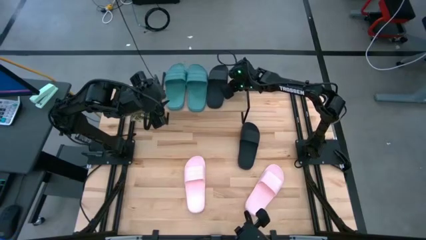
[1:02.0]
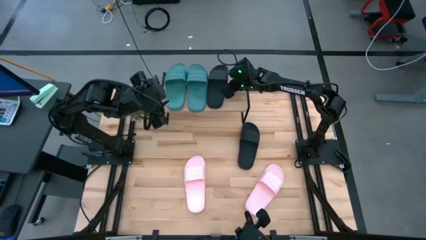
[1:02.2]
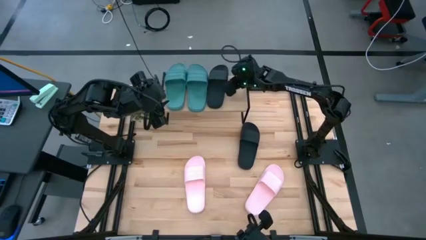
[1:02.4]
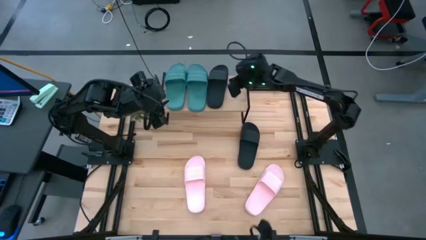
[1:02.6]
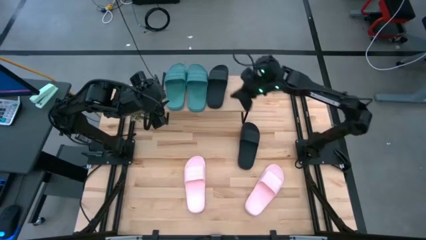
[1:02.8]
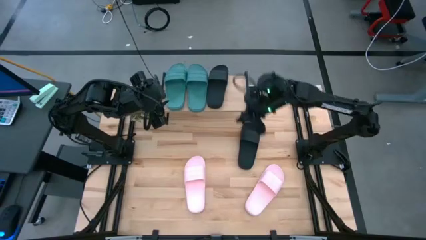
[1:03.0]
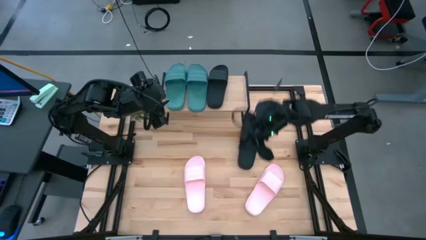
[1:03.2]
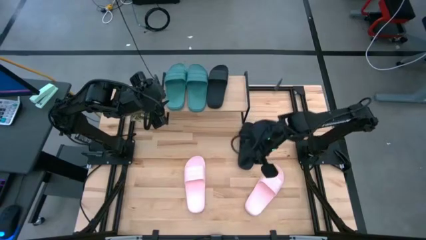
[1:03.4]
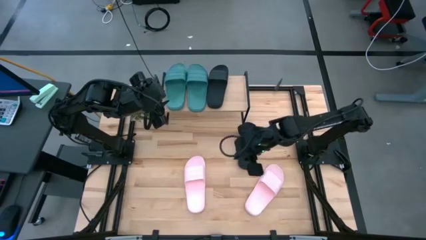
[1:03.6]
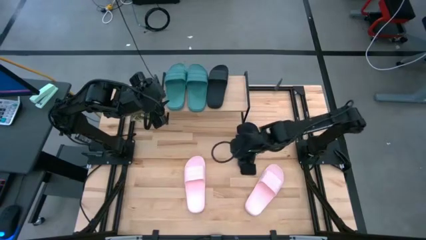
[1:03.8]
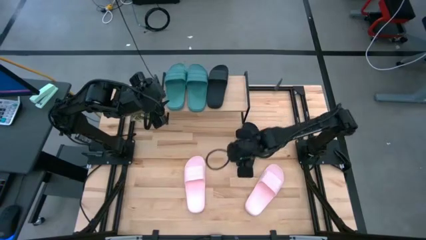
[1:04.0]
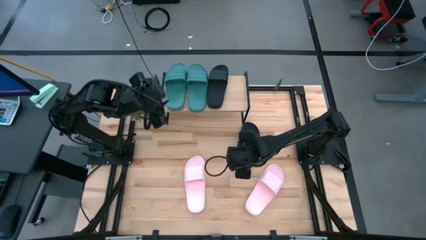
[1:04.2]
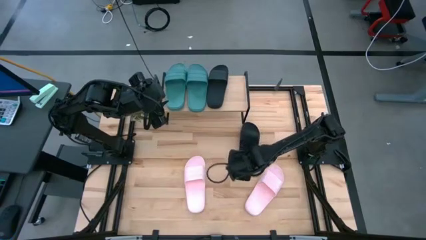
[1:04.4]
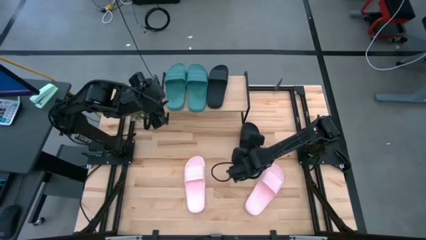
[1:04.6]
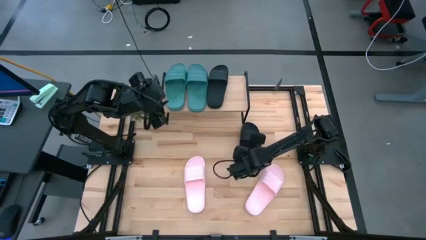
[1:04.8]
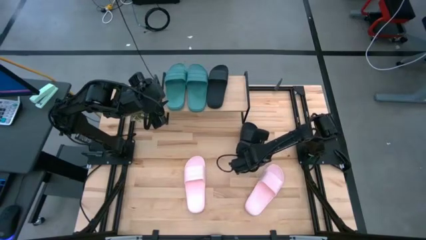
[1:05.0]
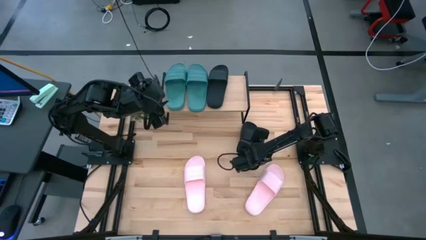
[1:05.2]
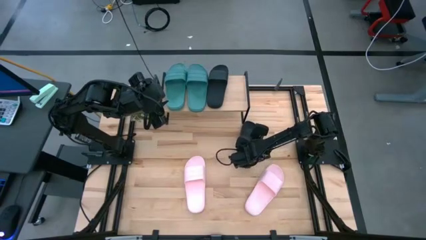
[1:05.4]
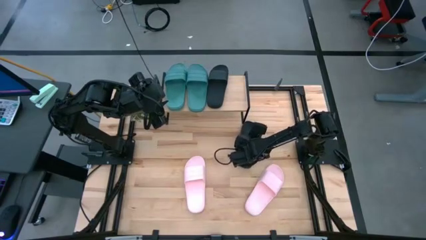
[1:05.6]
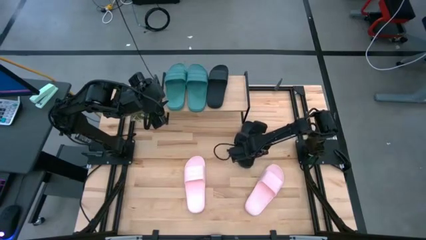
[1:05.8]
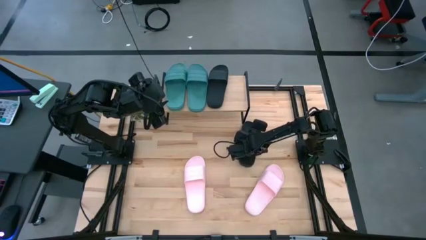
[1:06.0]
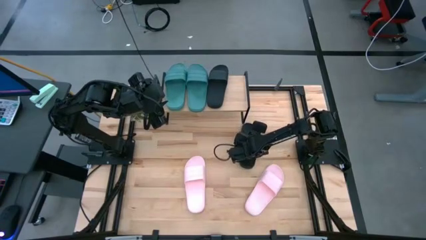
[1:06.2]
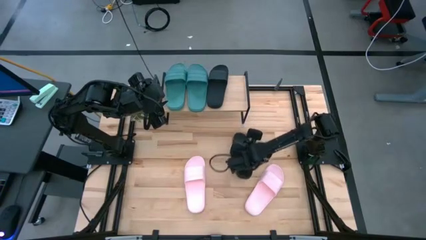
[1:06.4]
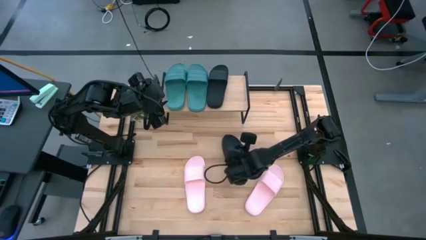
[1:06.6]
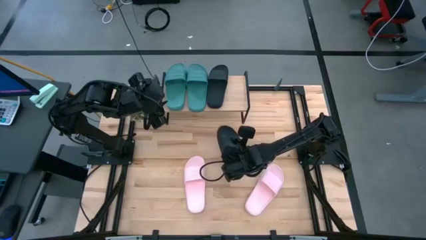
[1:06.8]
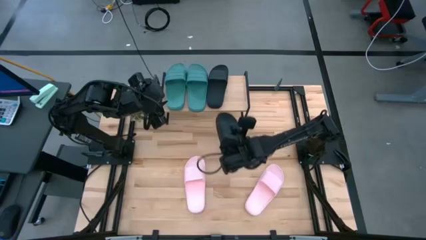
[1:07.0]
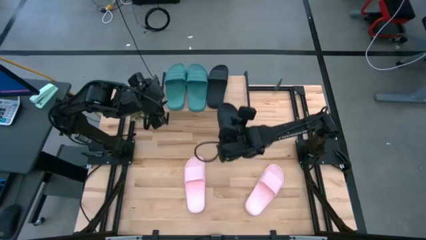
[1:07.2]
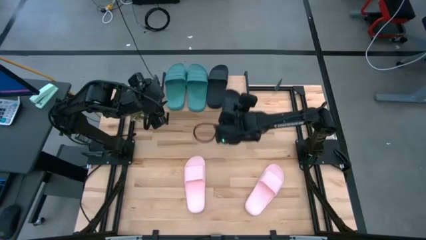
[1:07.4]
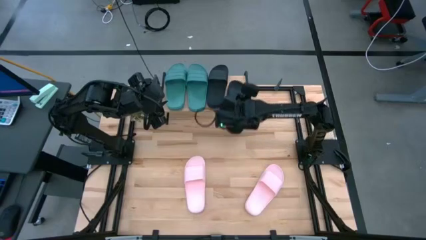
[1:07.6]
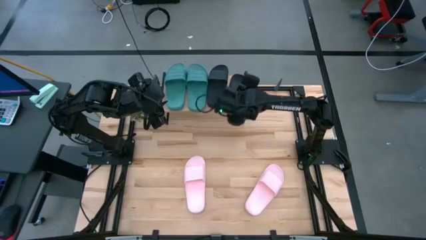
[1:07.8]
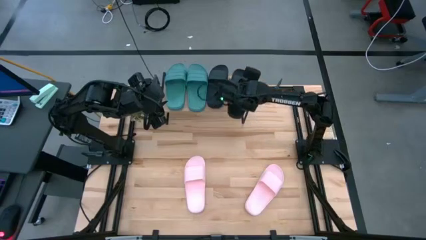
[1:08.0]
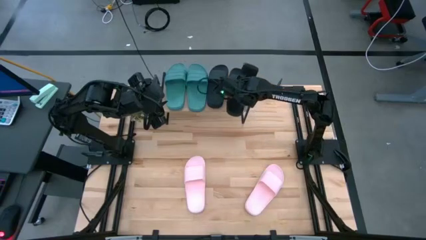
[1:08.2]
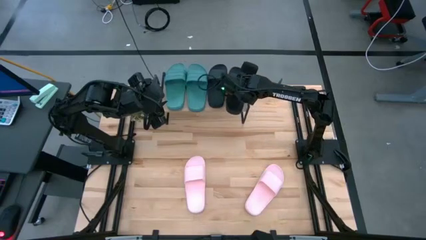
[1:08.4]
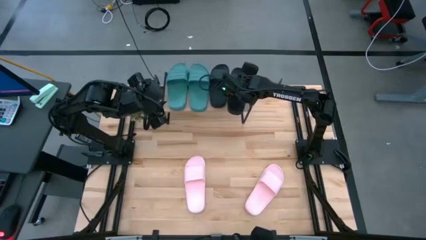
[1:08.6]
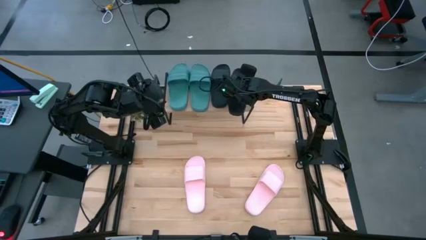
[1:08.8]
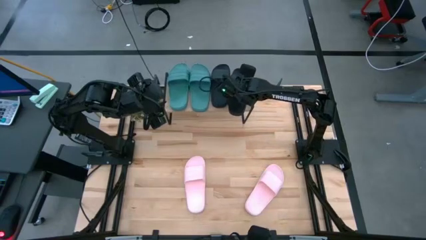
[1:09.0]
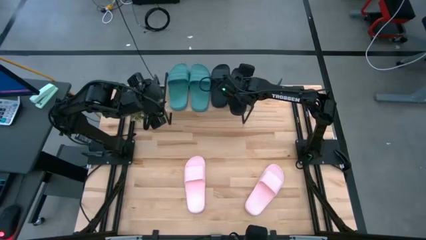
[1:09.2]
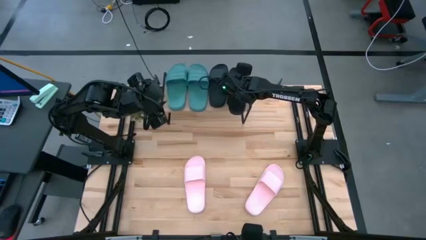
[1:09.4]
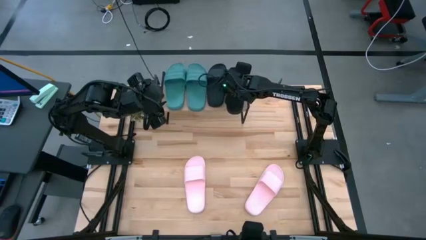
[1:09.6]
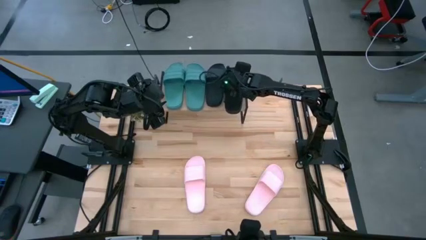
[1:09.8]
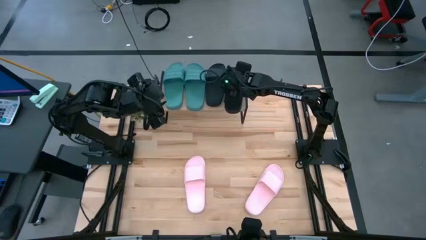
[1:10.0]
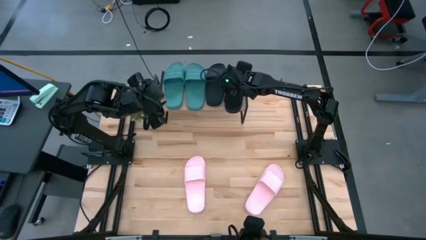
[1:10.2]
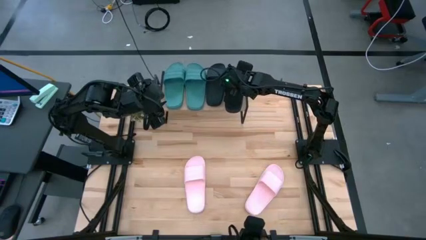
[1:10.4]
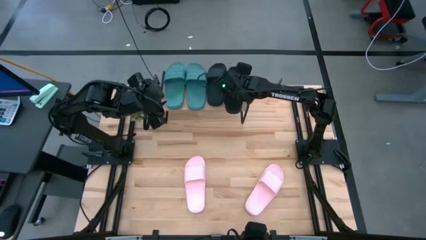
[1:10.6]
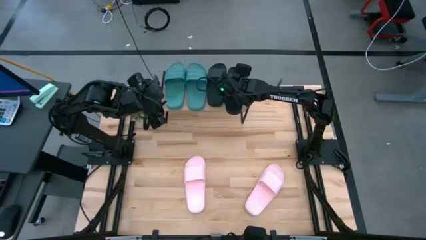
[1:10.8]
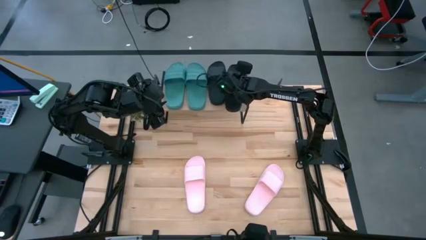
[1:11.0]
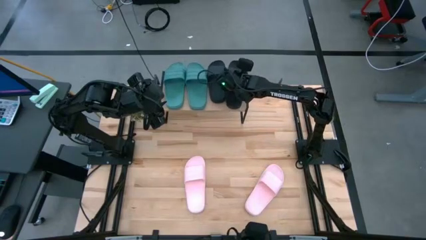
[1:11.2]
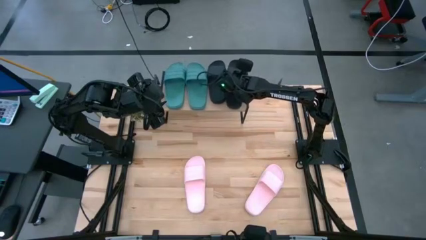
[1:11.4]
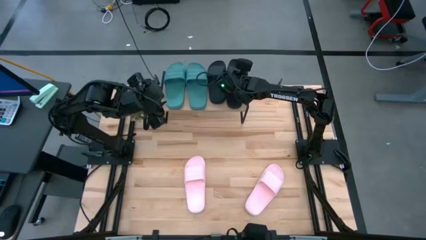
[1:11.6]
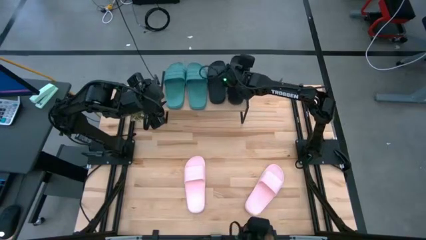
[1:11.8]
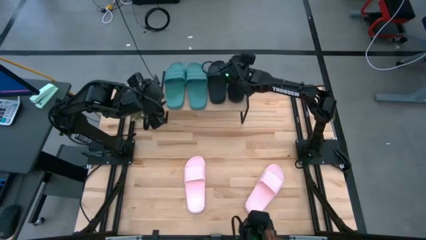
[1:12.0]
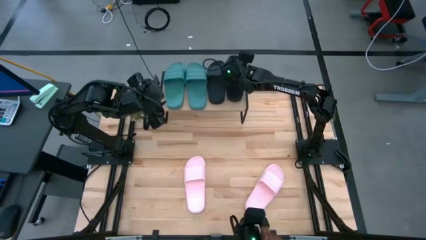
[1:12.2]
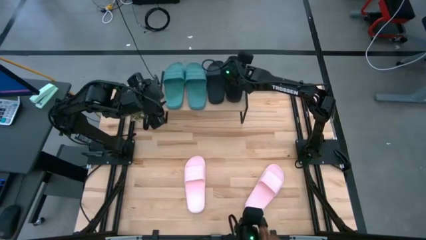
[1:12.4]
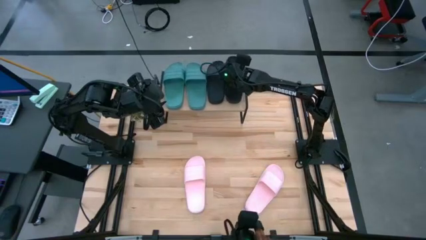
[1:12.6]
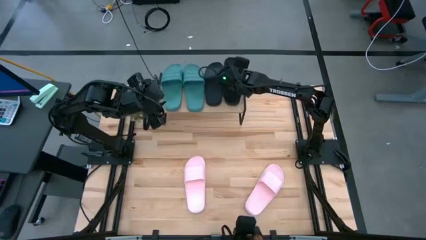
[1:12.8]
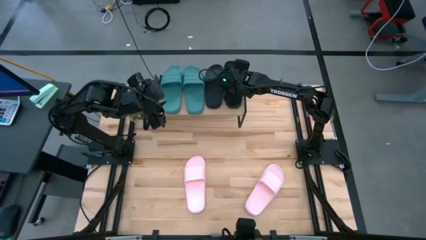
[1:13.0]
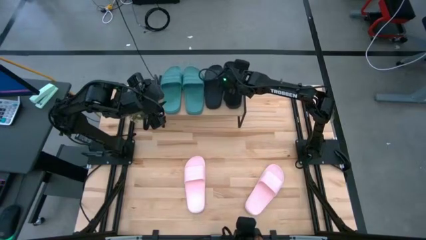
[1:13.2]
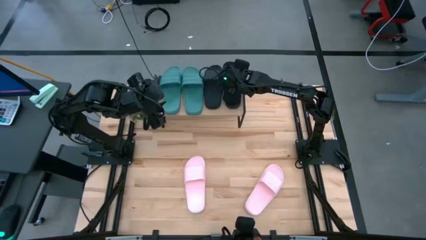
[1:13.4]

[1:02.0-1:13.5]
Task: Pick and place slides into the shelf
Put the black slide on the shelf

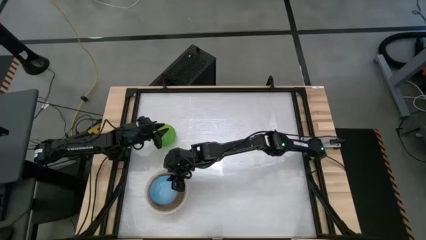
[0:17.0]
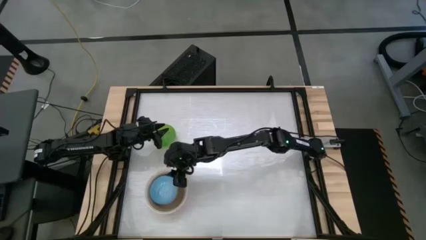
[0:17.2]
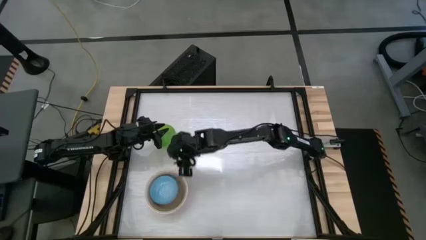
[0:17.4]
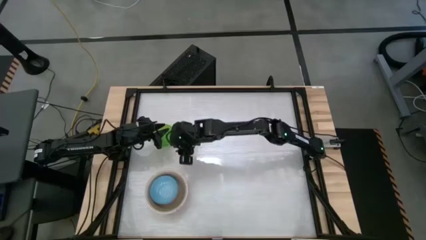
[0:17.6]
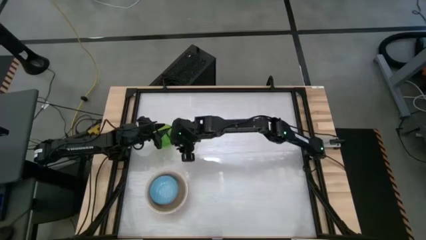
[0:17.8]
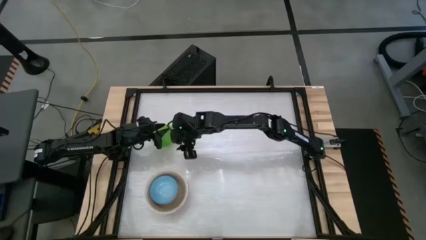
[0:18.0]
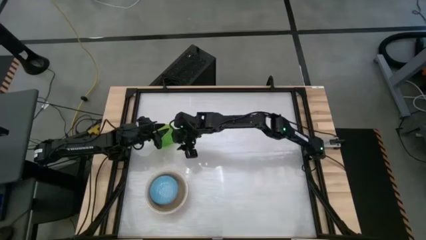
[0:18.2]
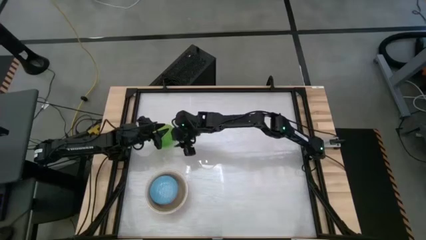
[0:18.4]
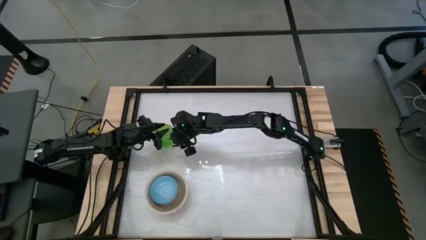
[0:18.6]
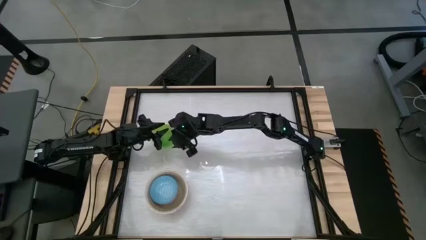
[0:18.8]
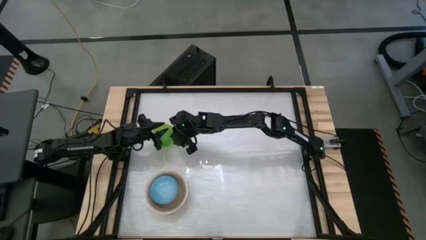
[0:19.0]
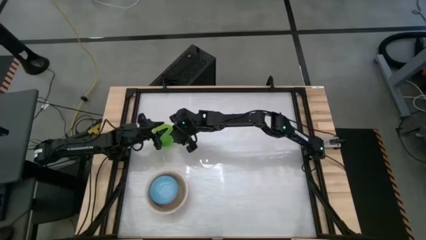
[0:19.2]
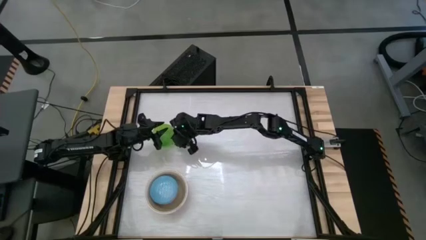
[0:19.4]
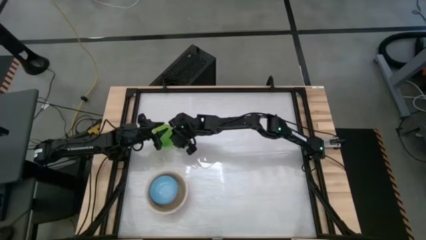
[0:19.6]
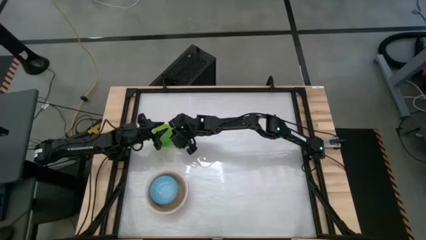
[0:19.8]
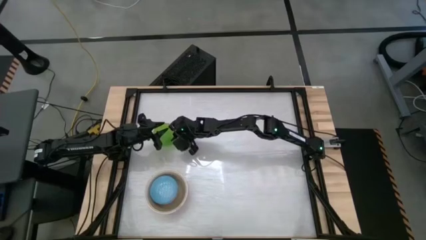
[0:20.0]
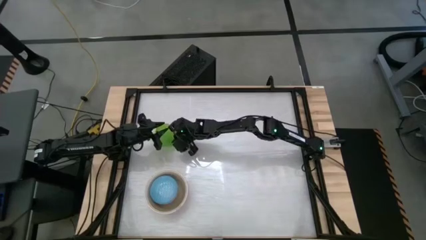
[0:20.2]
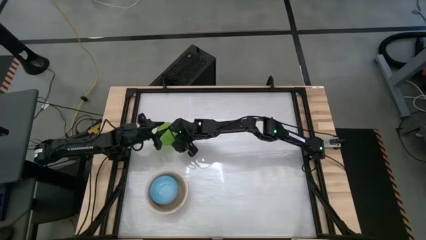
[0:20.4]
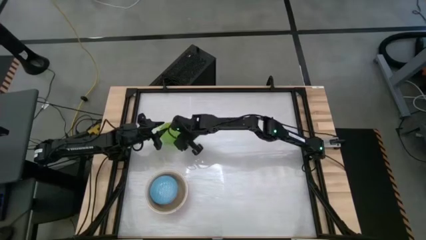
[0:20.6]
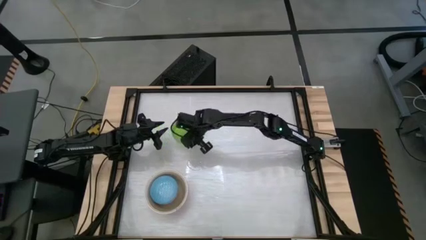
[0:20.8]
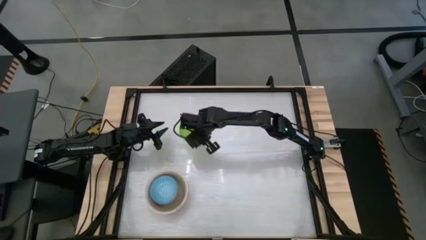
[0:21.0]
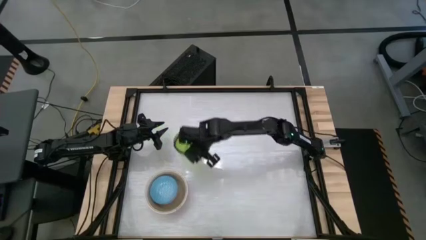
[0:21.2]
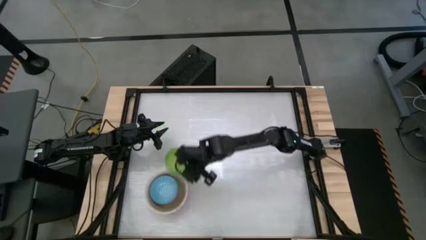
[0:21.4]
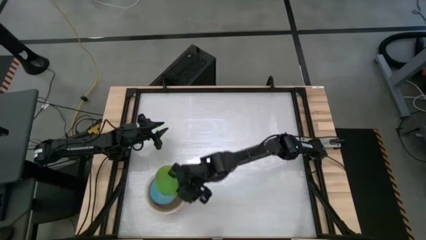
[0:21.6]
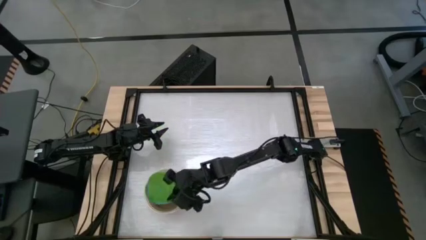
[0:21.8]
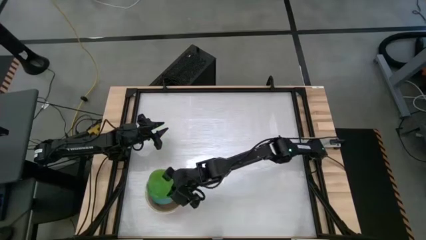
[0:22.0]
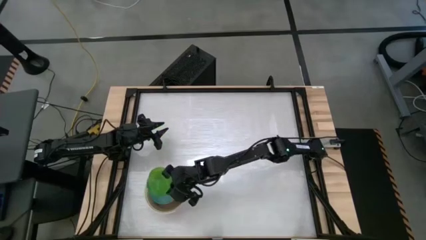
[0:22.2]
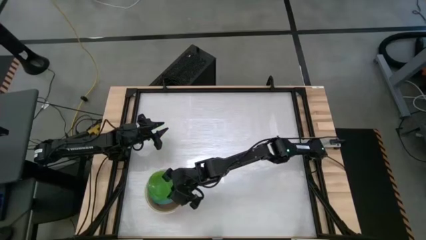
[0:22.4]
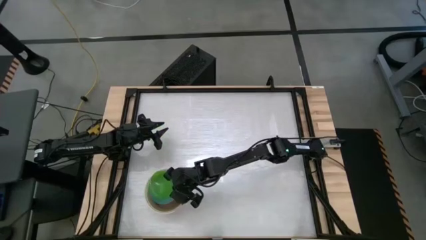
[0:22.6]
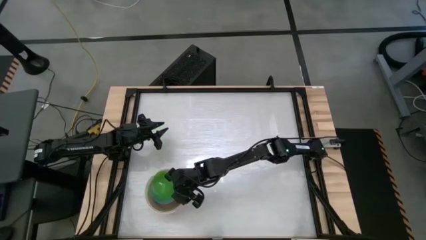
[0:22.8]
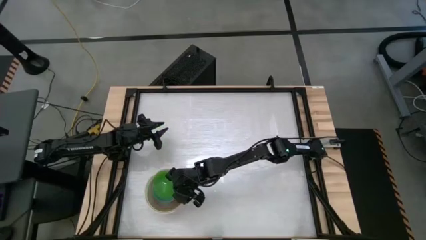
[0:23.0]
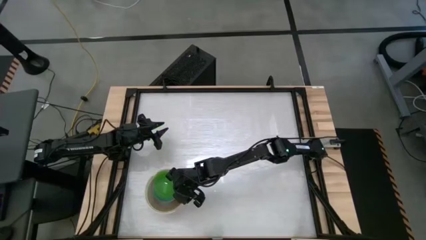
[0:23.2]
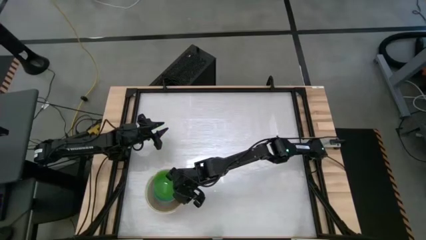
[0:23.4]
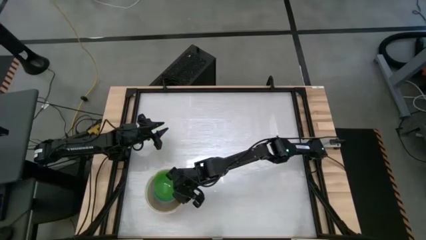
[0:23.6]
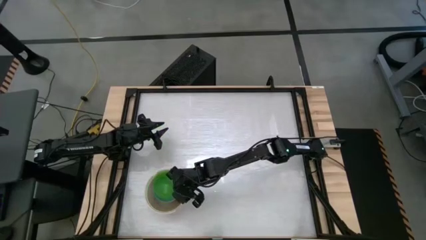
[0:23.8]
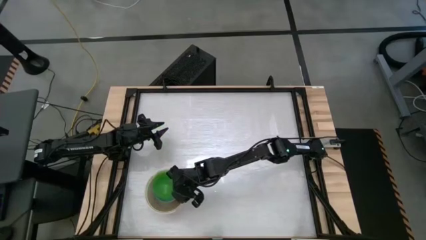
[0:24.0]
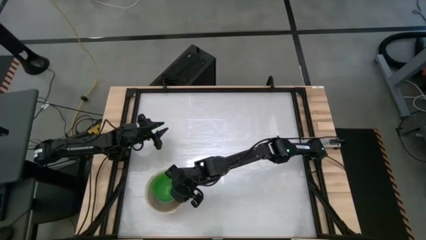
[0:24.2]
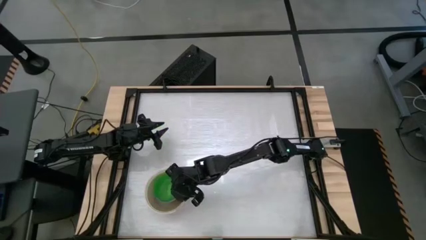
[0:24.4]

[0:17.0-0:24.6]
Task: Nest bowls inside each other by size order
Stack the light green transparent bowl on top of the orange and blue patterned bowl
